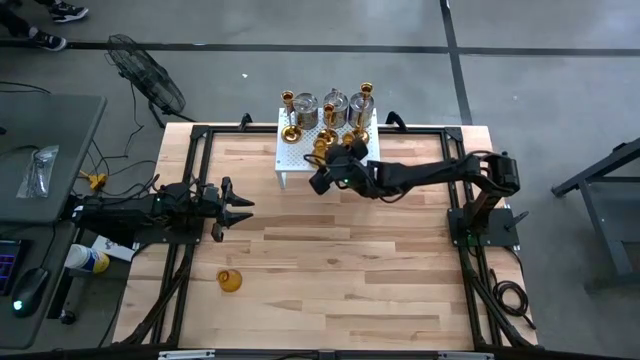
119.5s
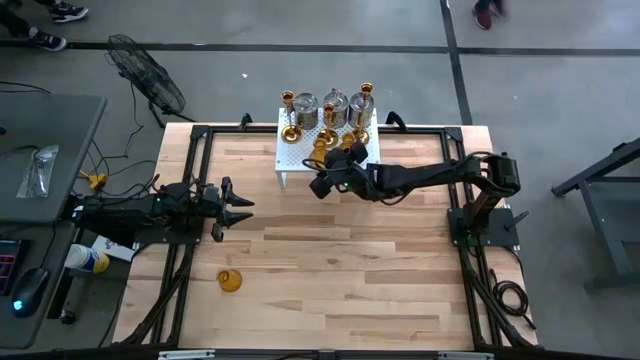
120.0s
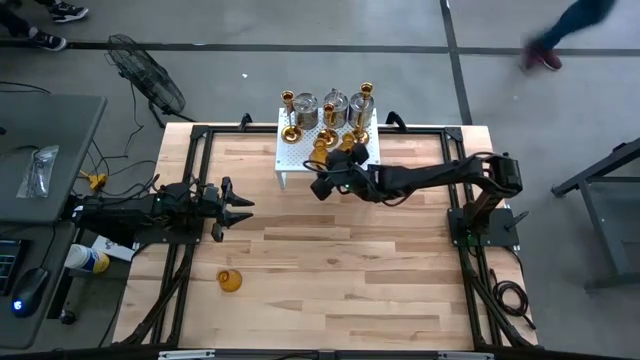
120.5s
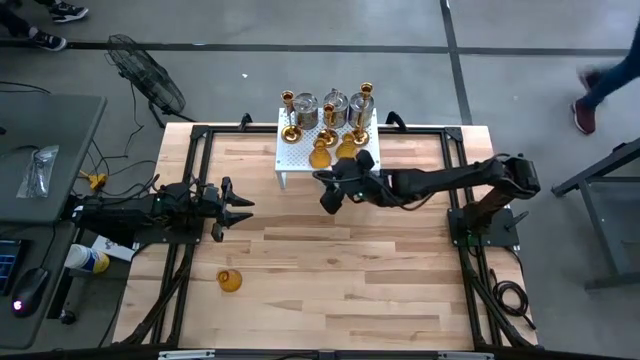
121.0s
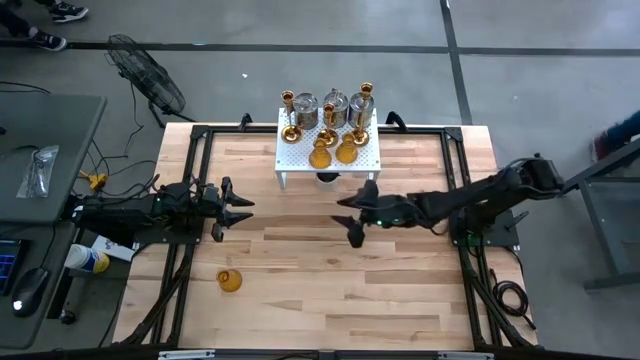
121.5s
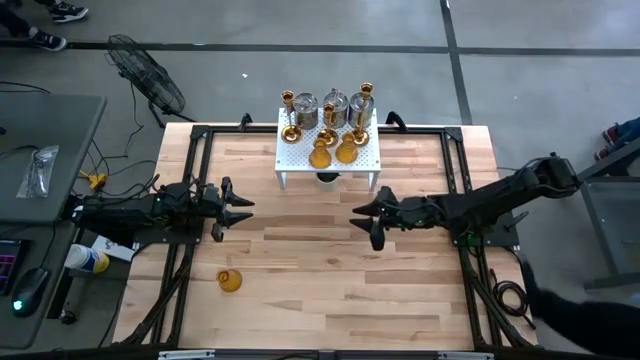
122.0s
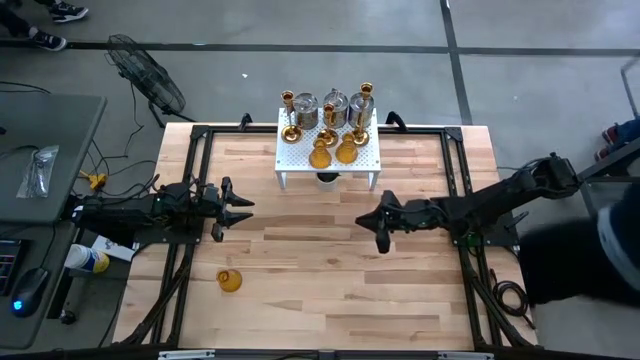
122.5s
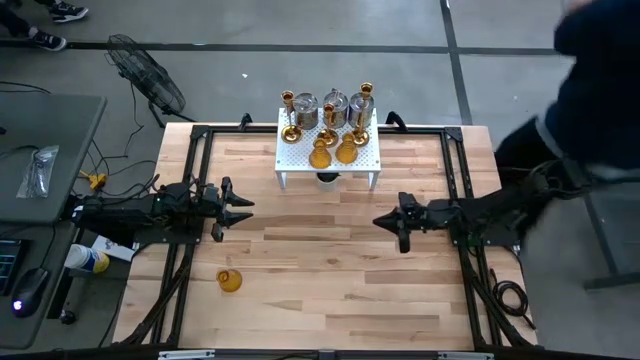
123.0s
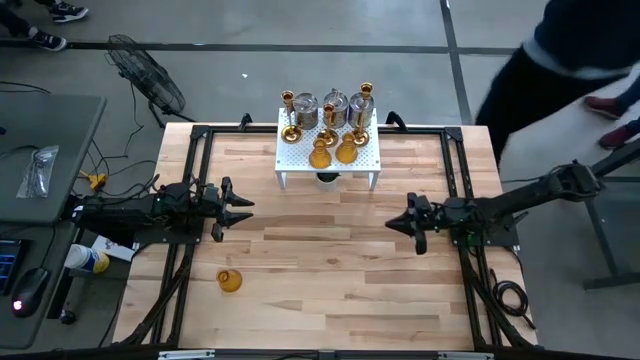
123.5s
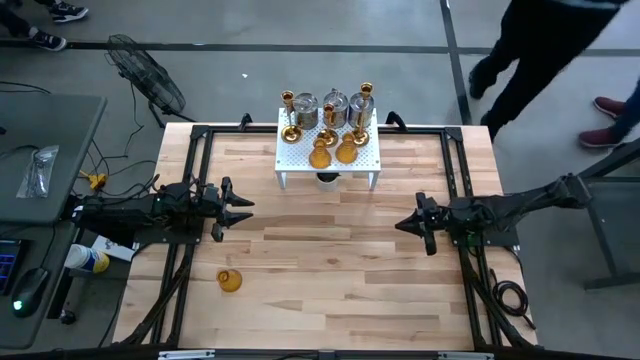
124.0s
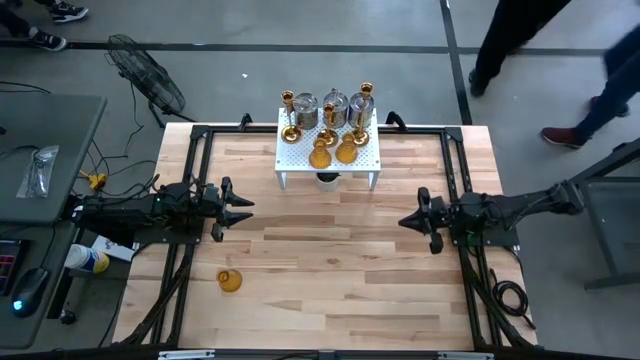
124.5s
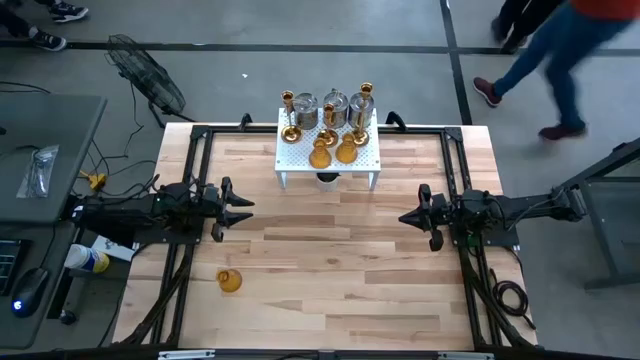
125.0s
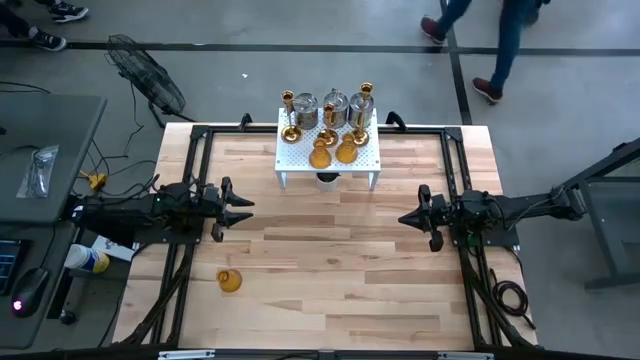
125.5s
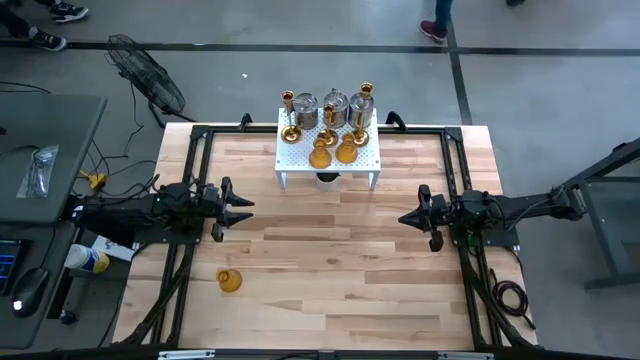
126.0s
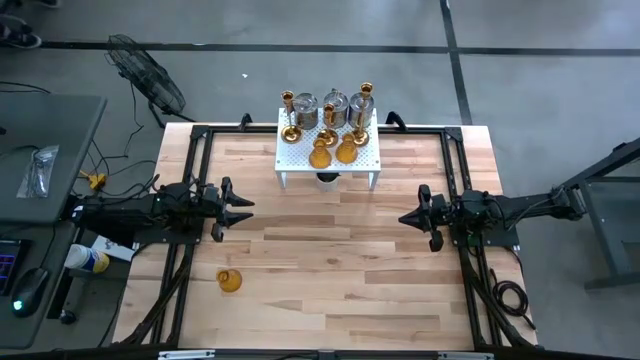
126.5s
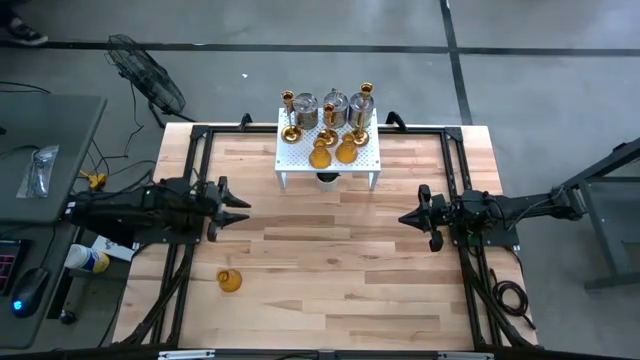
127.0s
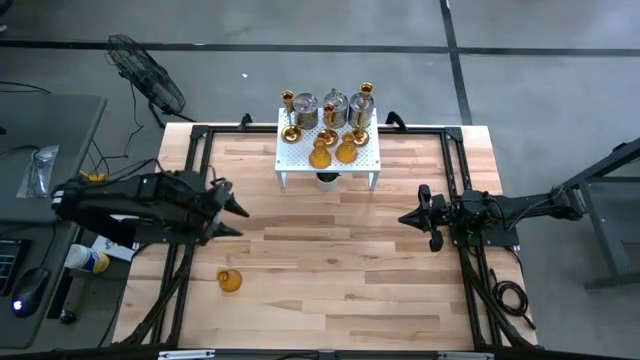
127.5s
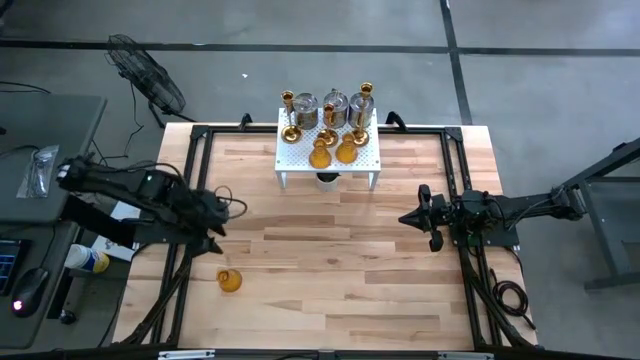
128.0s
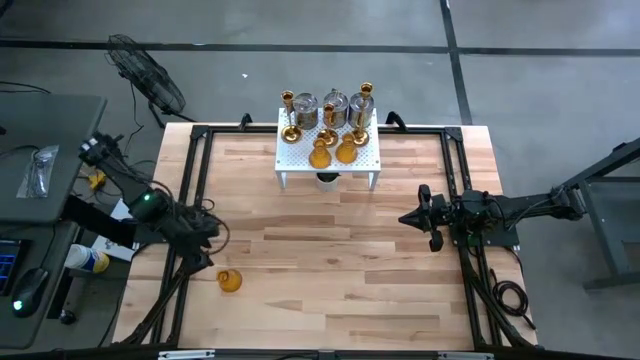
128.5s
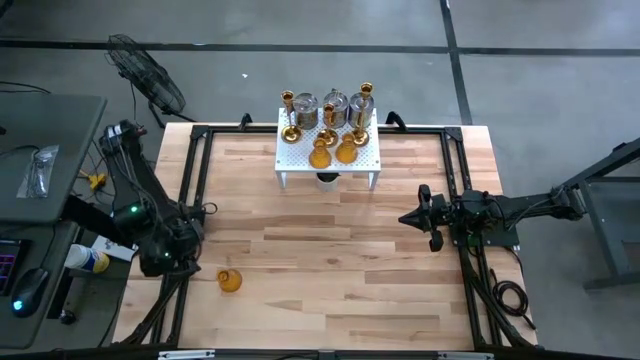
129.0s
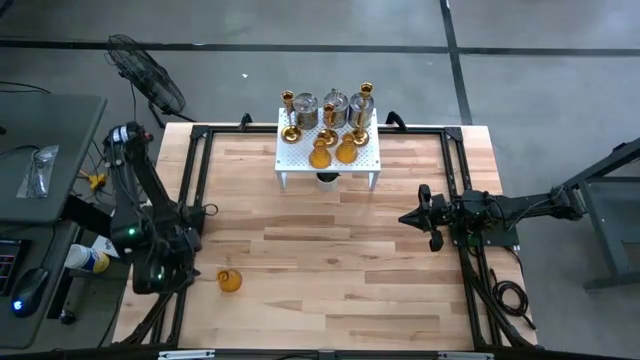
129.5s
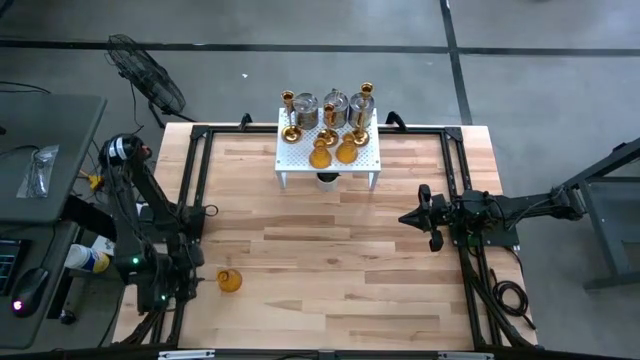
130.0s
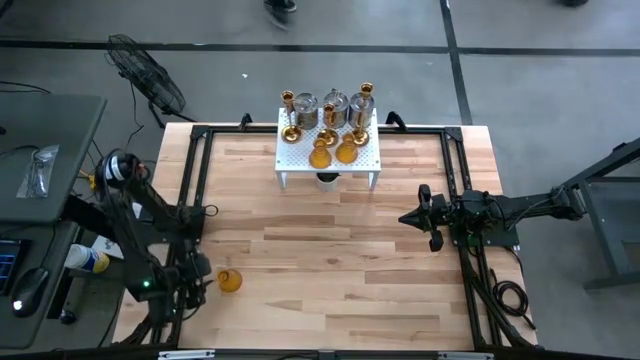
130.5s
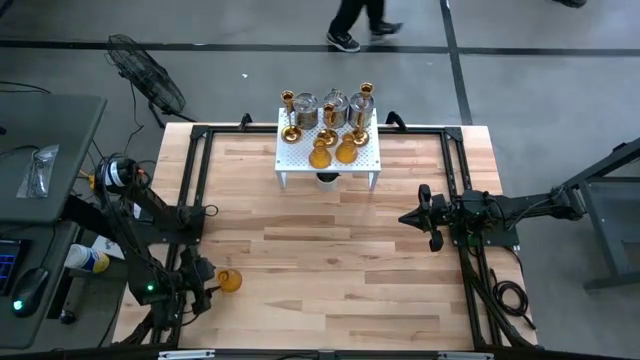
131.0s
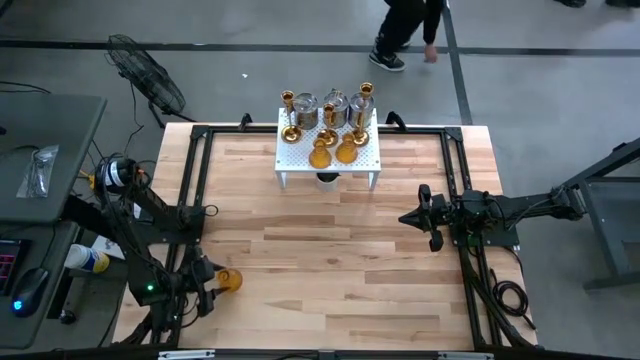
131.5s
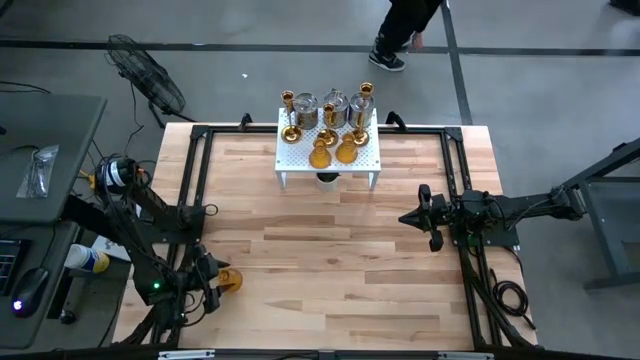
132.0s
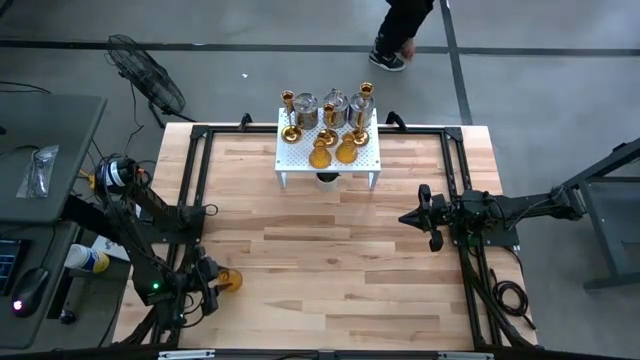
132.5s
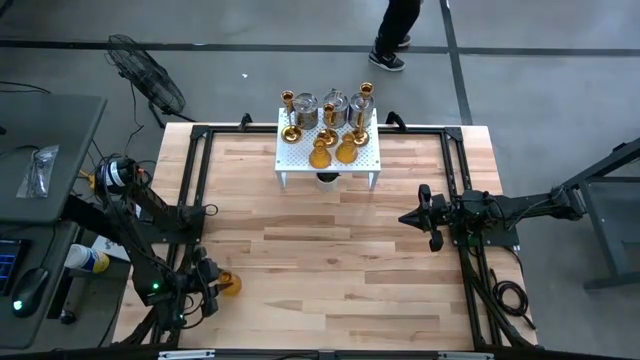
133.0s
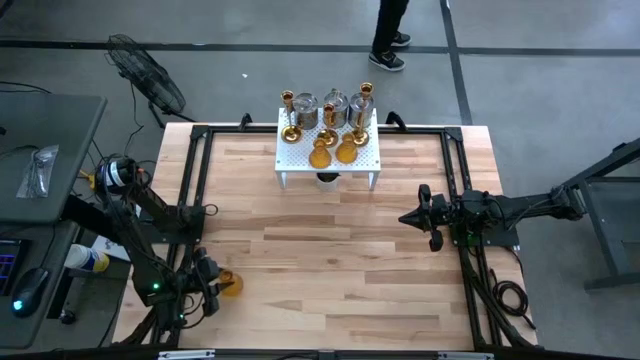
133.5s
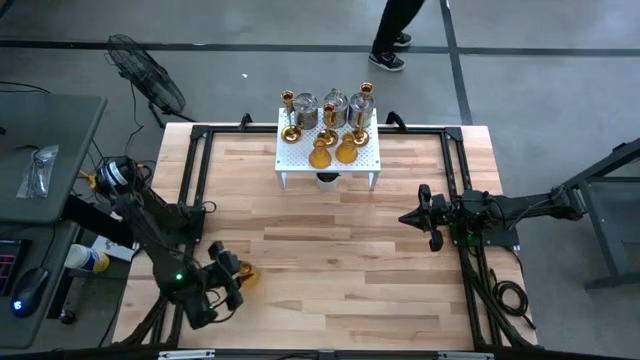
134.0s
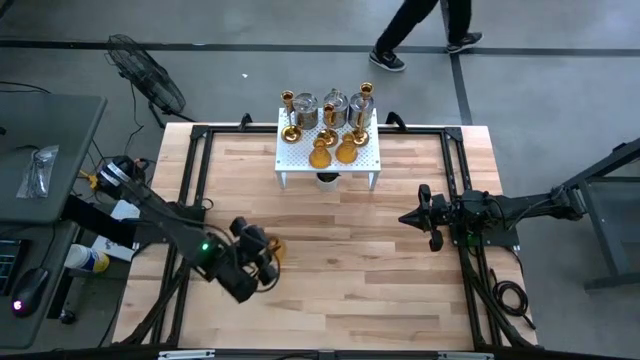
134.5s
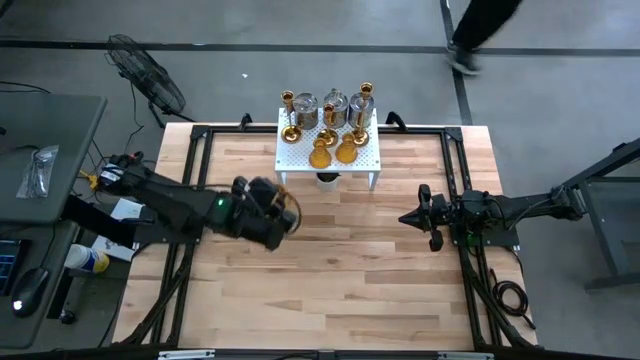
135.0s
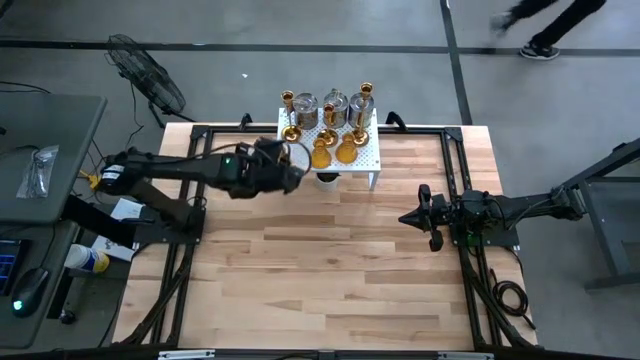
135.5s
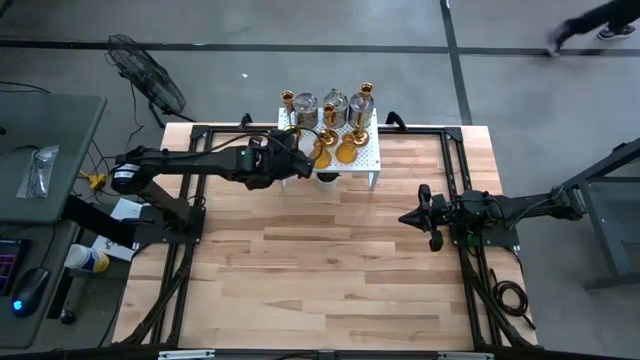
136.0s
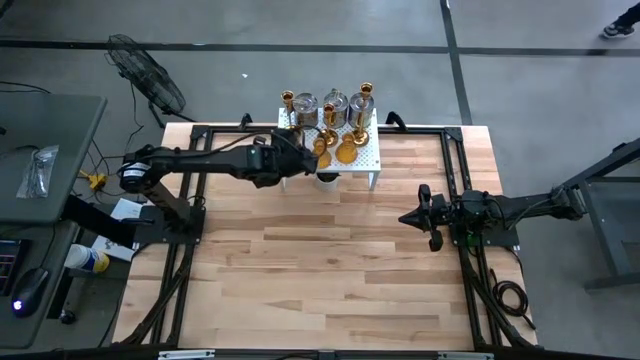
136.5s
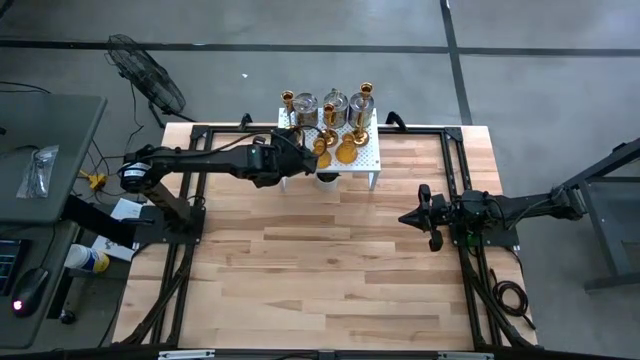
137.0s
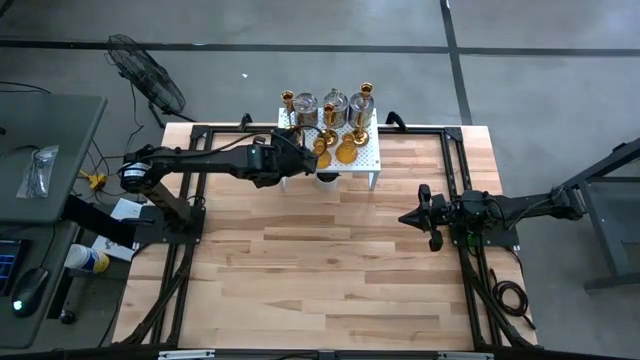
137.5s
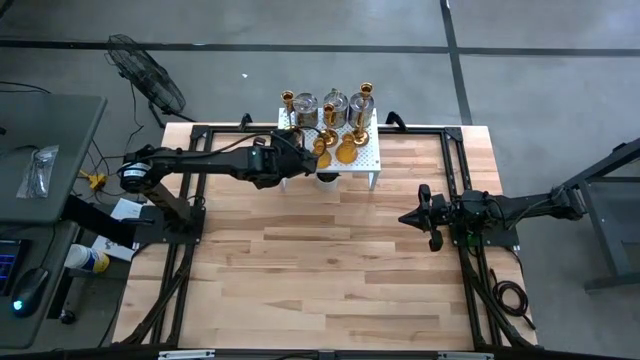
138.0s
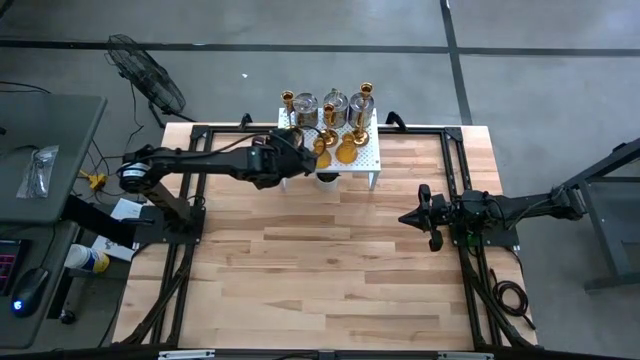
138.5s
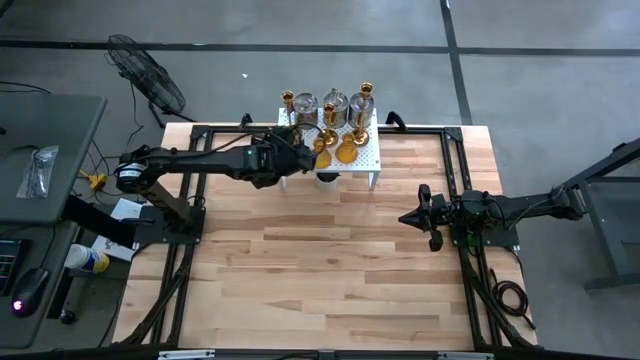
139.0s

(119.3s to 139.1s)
Task: Pick & Place candle stick holders
Put the gold candle holder on the shelf
